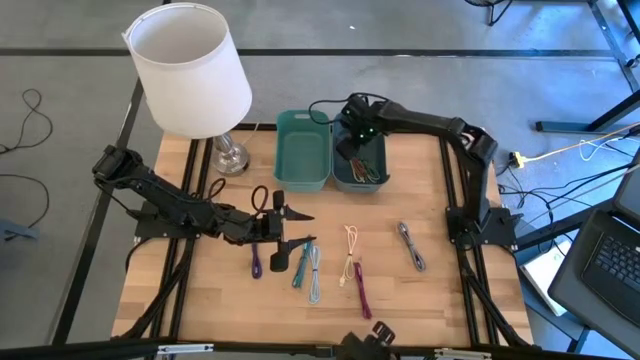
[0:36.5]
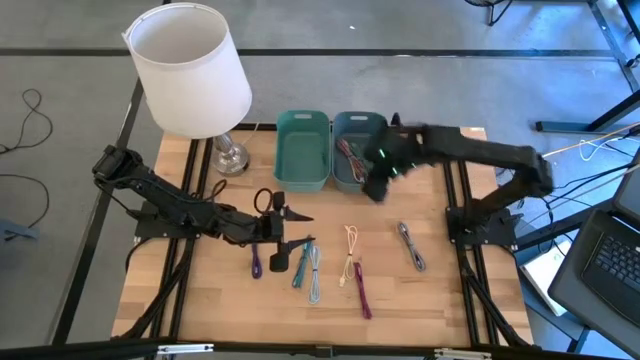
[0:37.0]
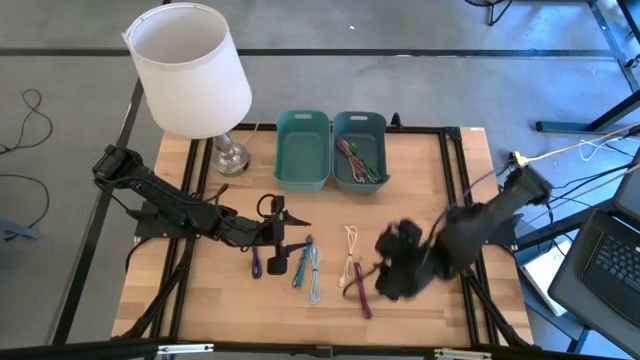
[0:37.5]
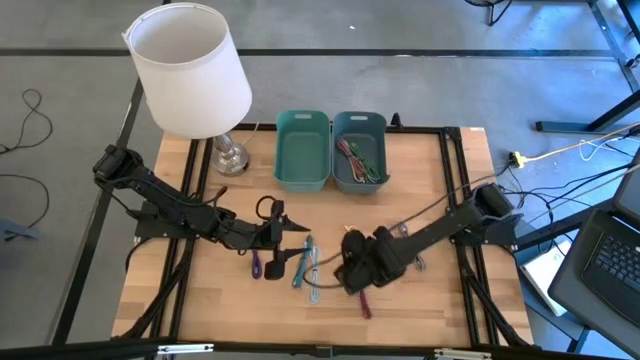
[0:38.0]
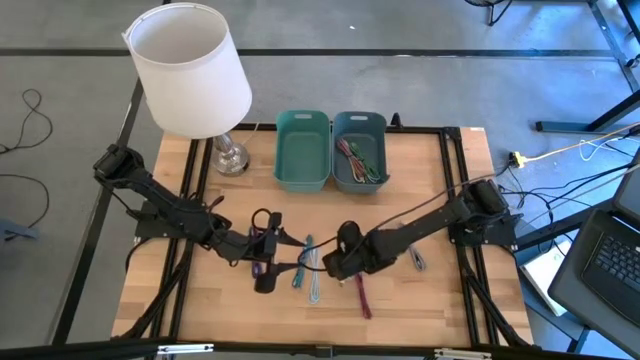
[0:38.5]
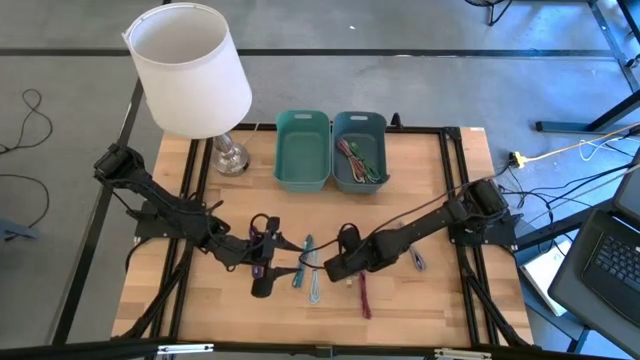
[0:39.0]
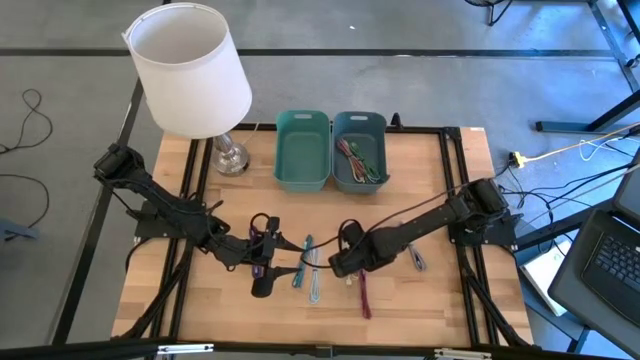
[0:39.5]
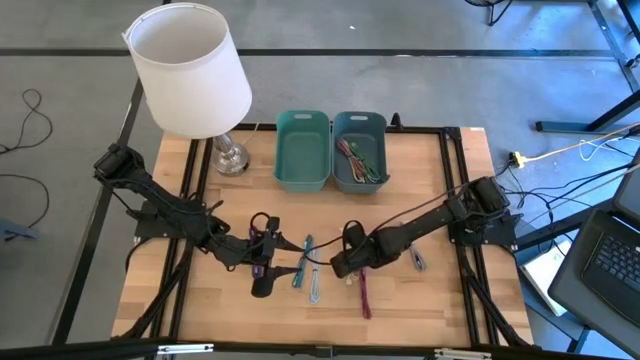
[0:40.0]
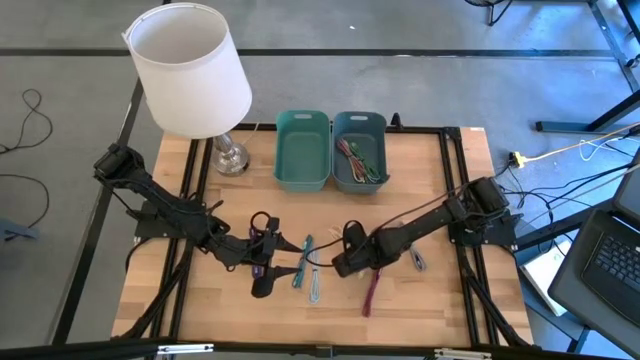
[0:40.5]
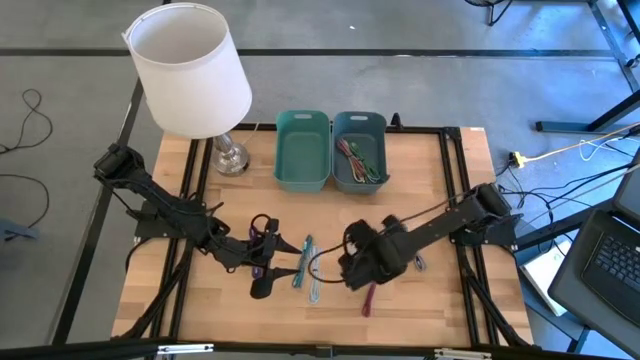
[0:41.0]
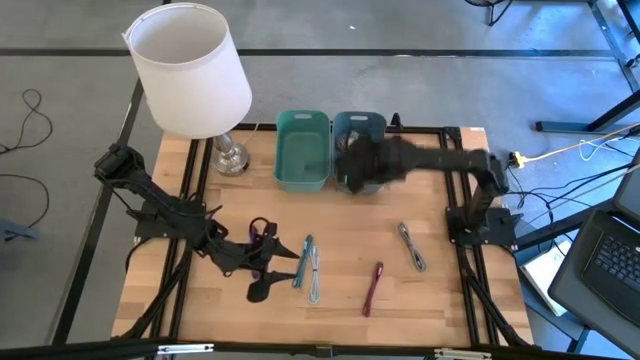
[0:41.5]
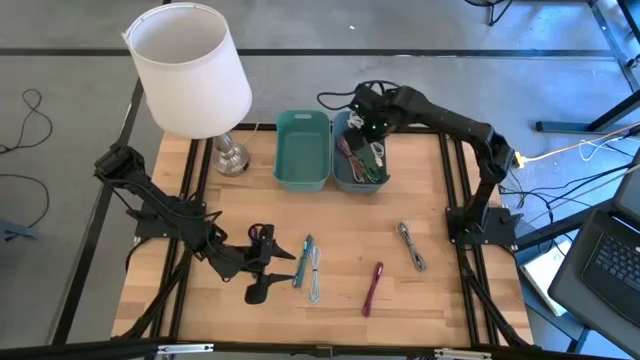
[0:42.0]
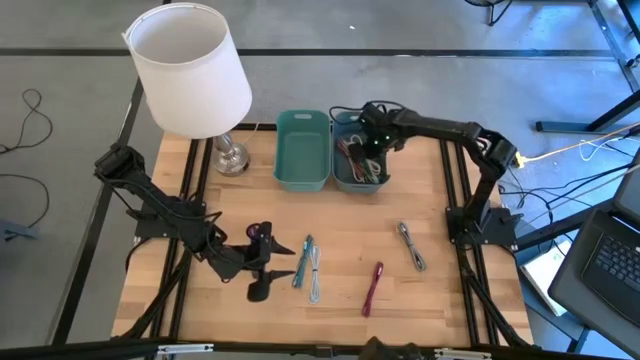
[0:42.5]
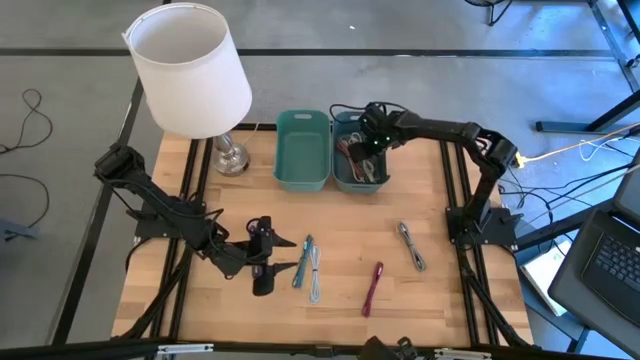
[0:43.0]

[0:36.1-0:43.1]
Put the white charger cable into the blue bin

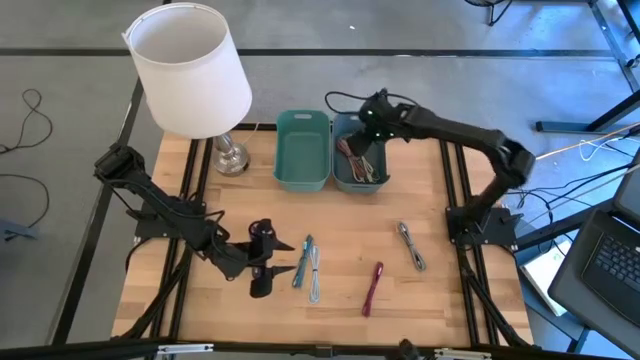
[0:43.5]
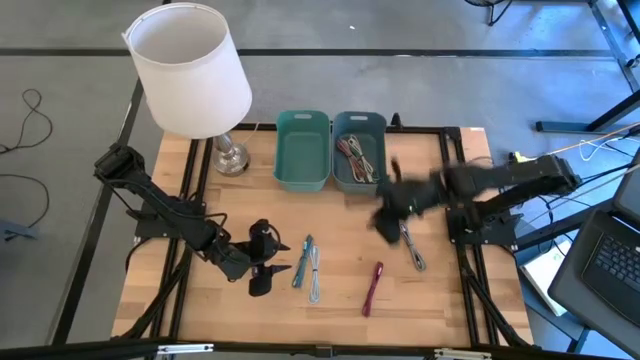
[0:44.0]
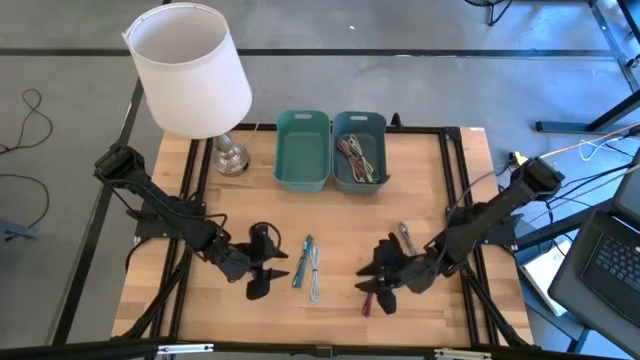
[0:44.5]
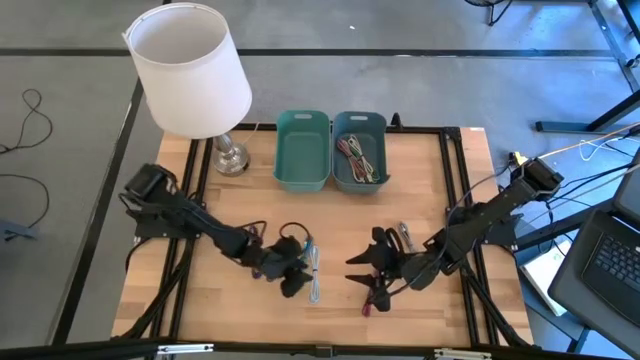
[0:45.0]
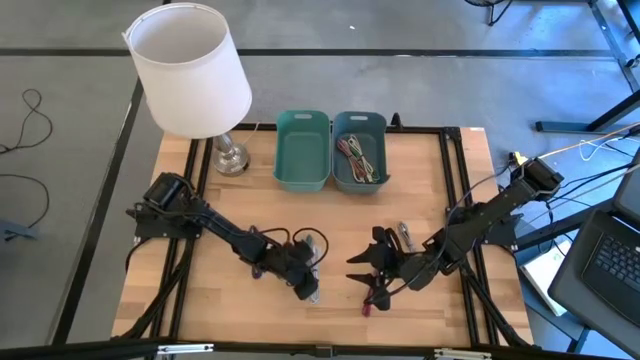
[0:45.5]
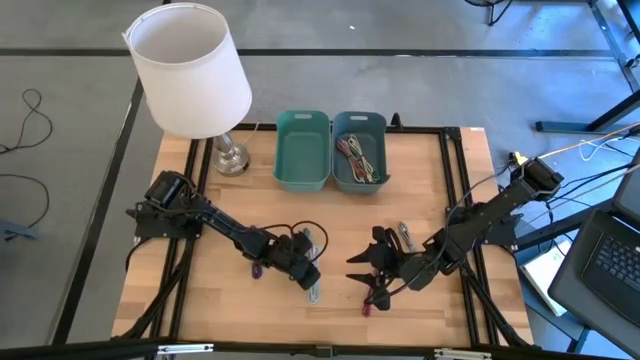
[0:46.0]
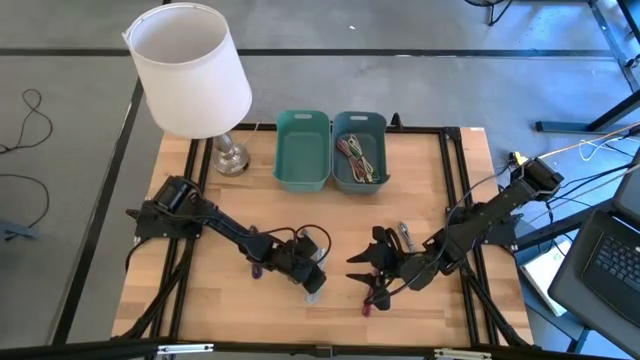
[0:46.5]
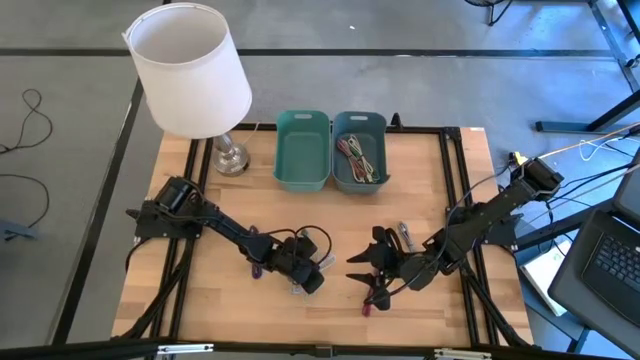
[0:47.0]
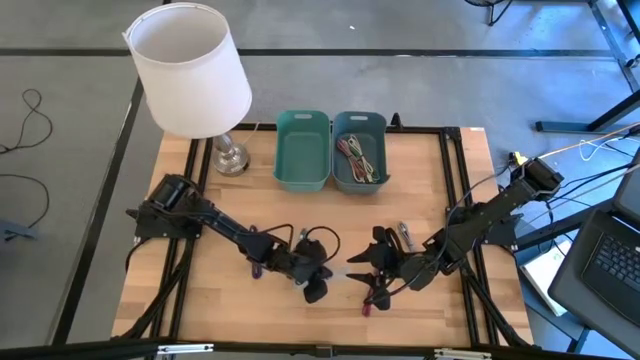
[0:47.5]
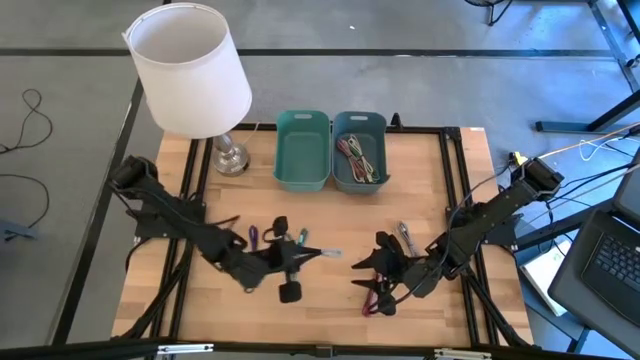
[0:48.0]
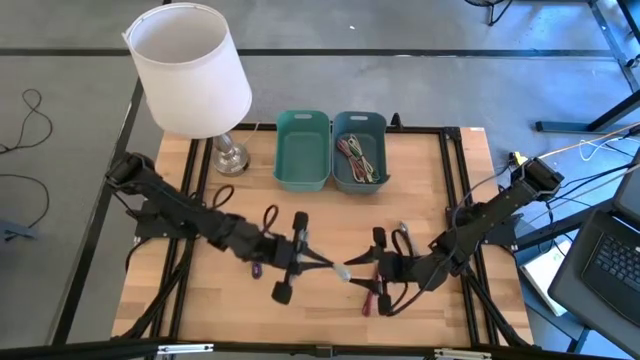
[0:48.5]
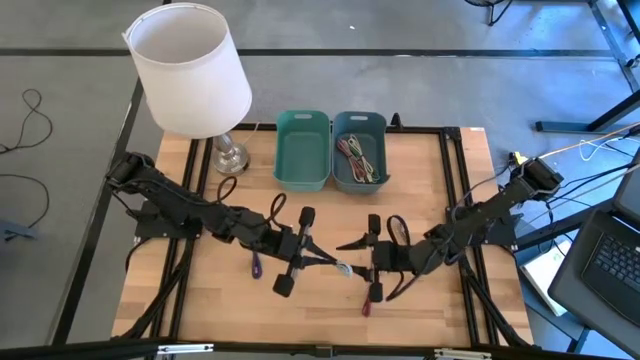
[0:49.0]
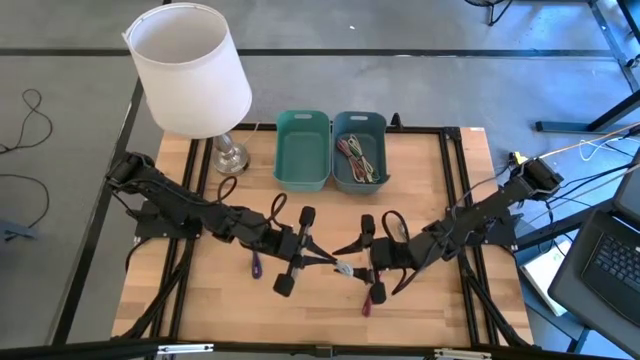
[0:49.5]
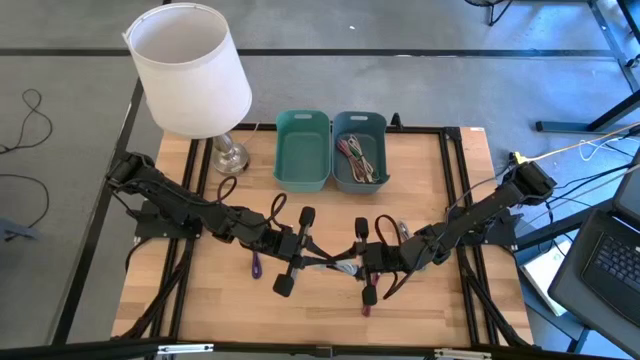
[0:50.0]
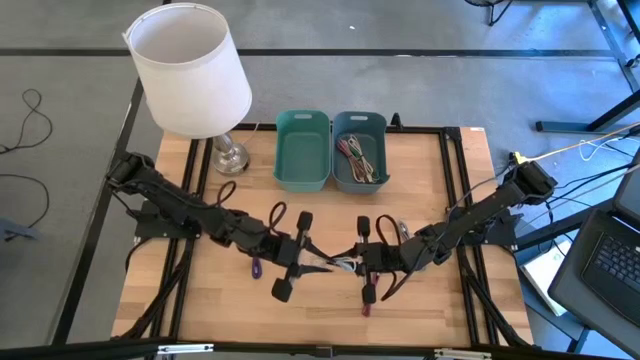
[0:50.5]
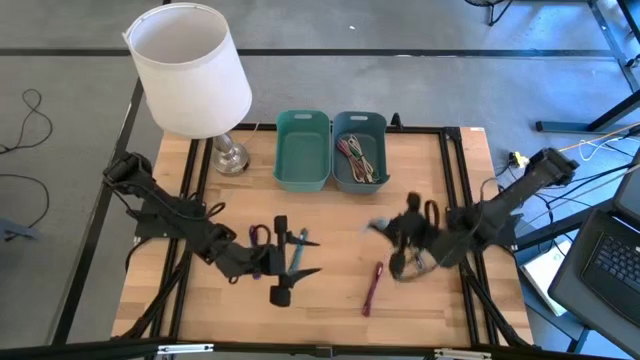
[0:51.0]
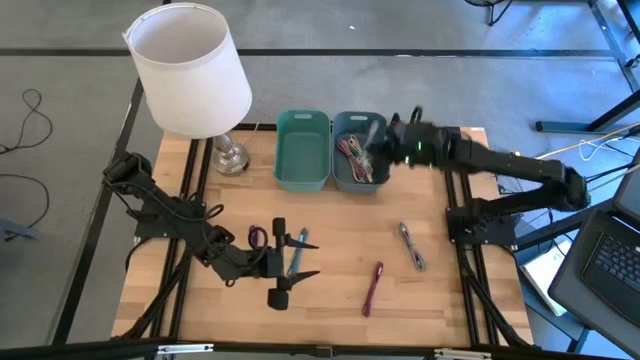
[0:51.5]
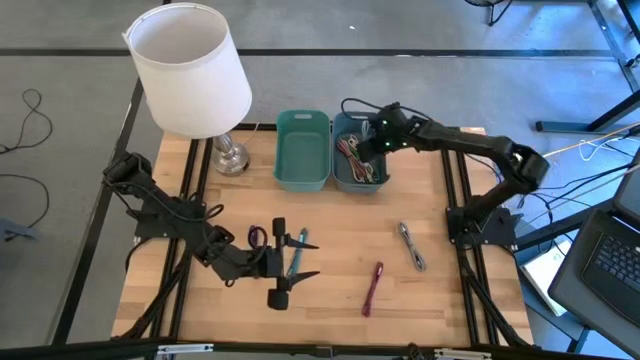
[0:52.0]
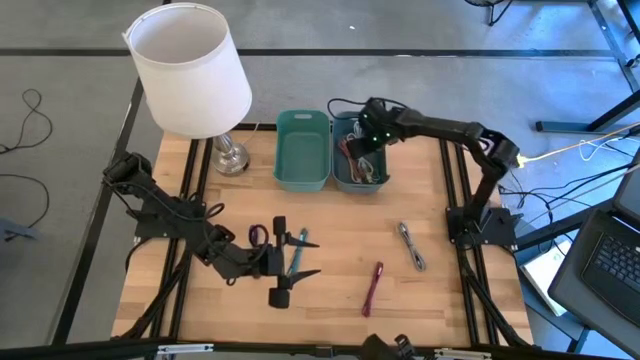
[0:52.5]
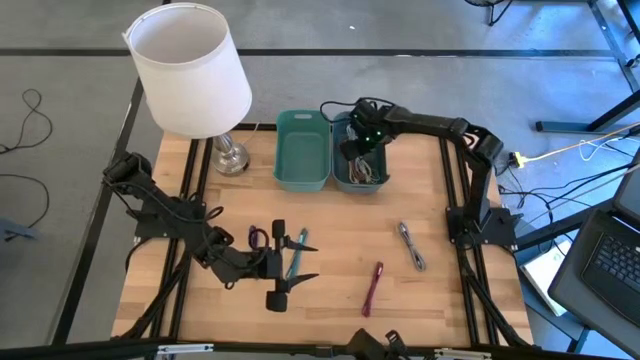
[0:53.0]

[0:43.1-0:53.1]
Put the light blue charger cable into the blue bin
